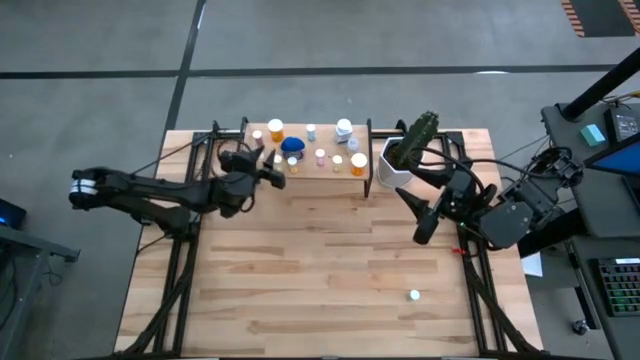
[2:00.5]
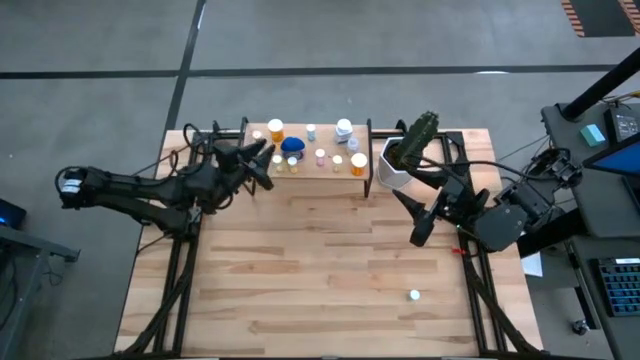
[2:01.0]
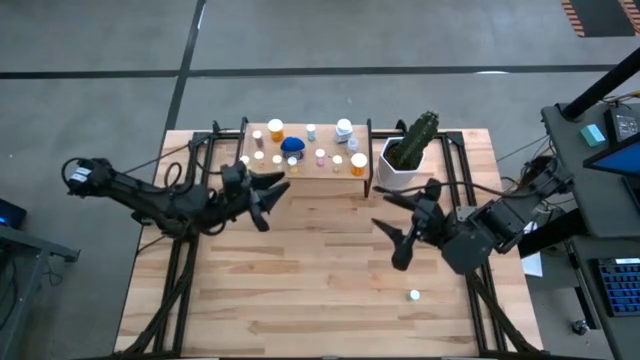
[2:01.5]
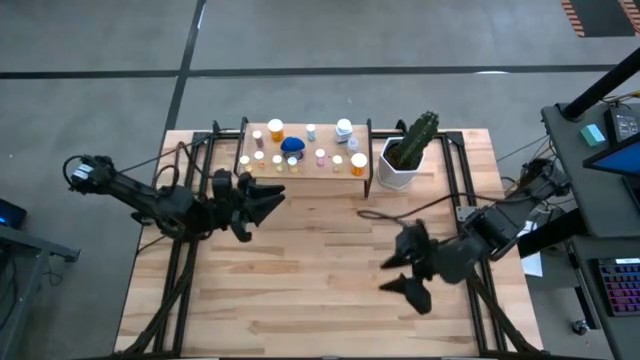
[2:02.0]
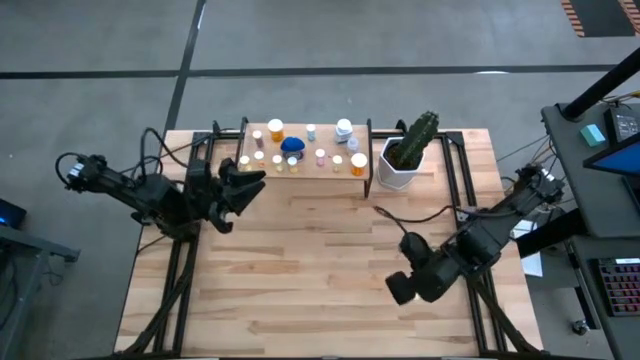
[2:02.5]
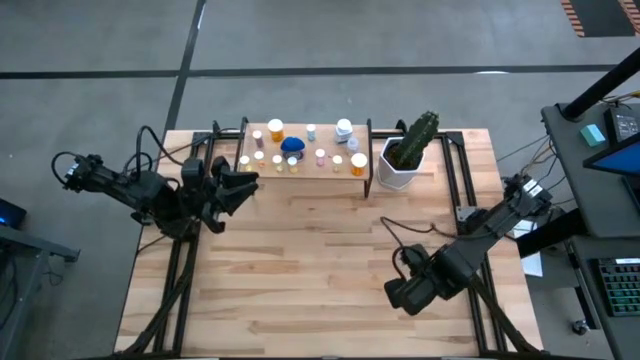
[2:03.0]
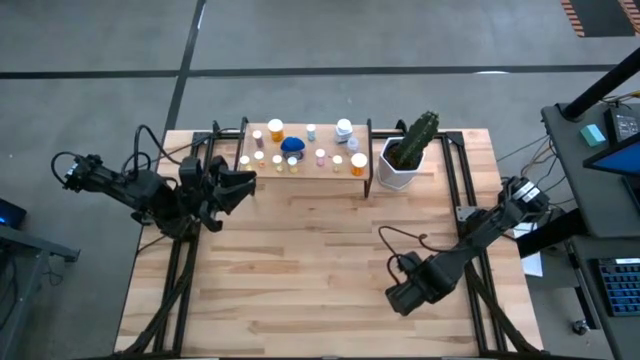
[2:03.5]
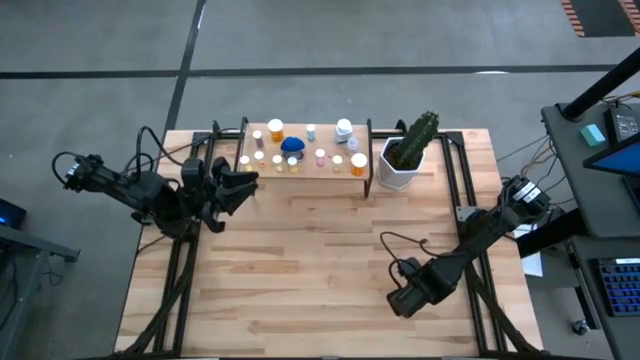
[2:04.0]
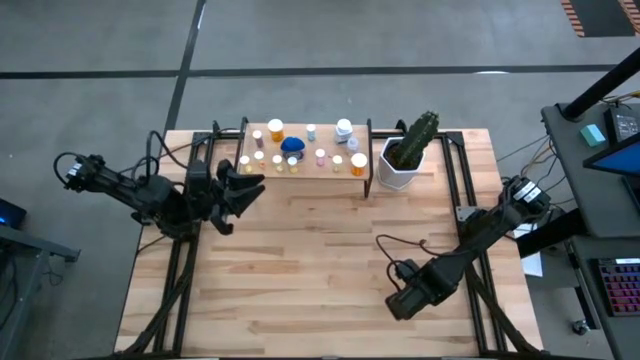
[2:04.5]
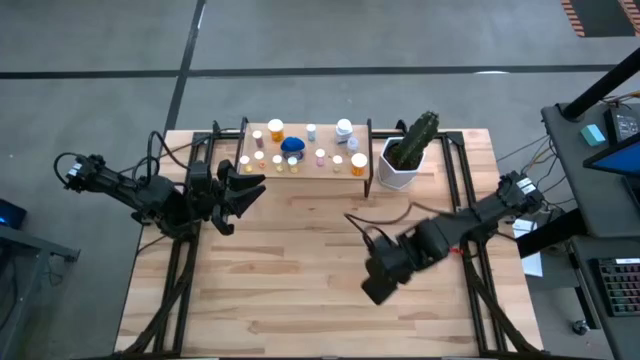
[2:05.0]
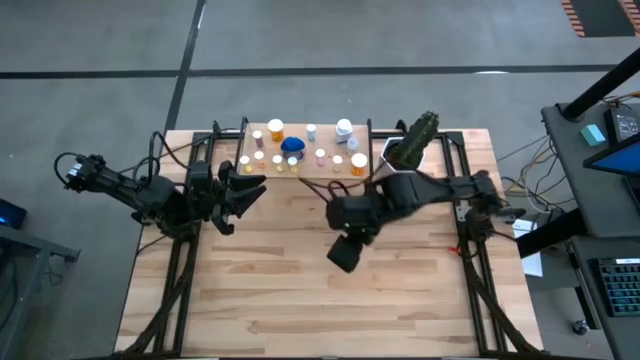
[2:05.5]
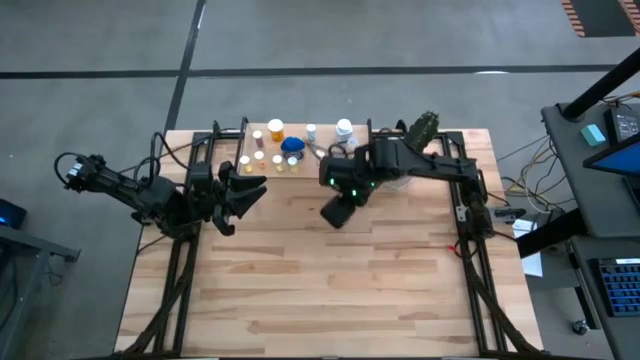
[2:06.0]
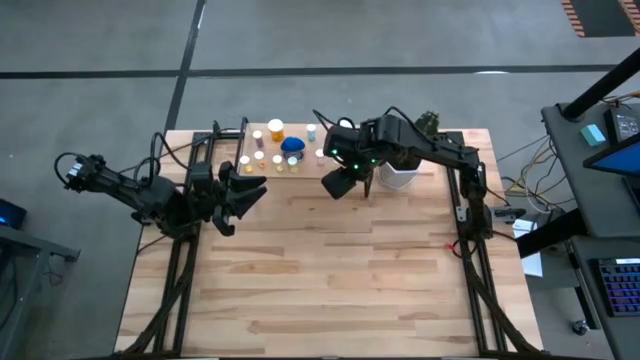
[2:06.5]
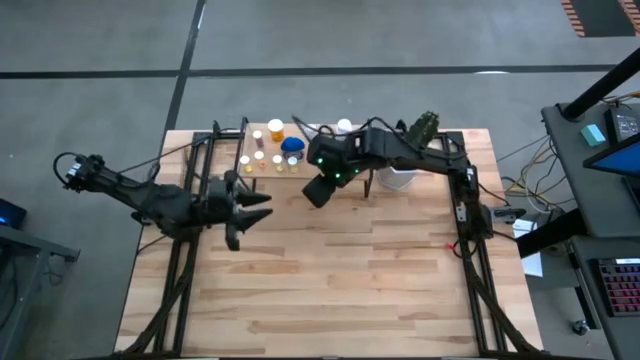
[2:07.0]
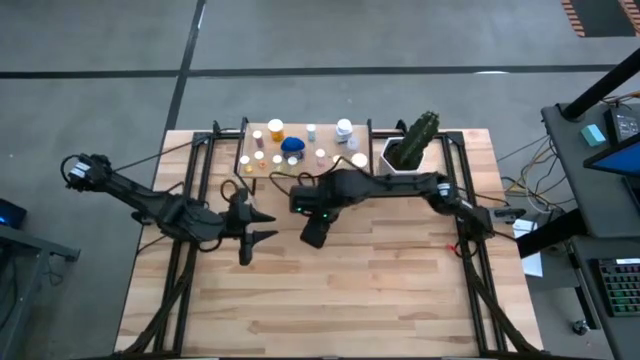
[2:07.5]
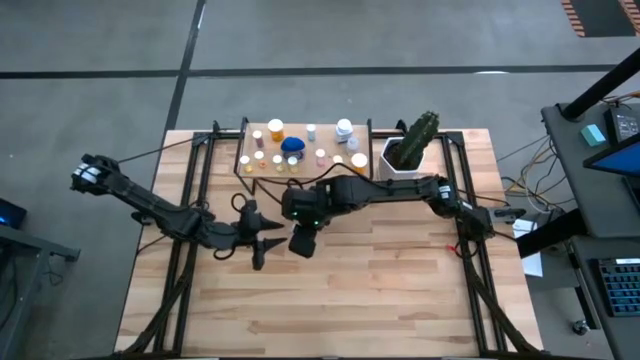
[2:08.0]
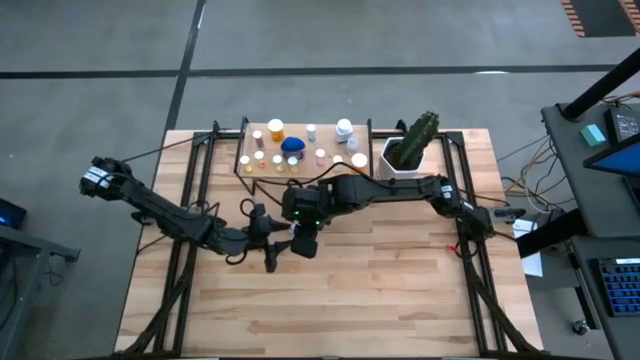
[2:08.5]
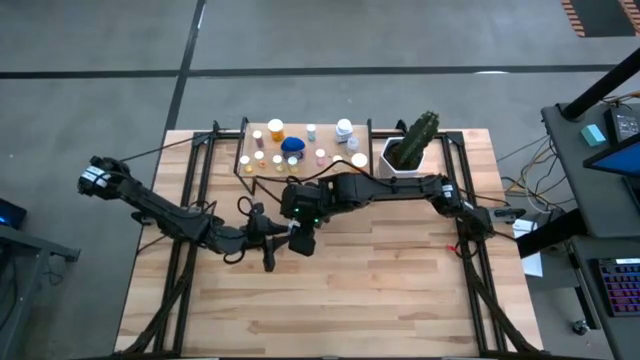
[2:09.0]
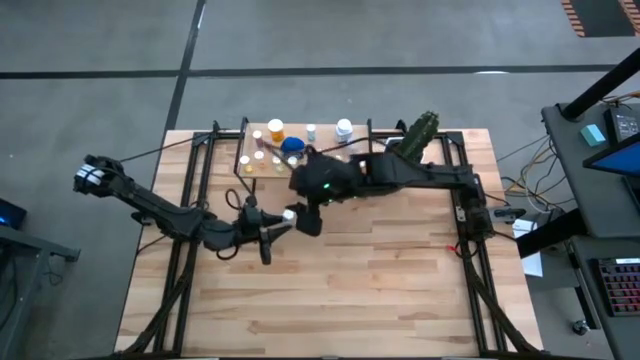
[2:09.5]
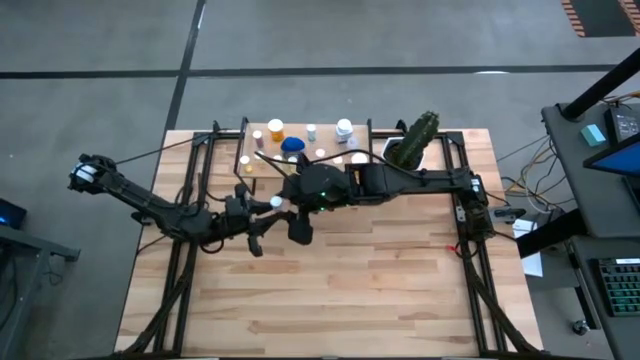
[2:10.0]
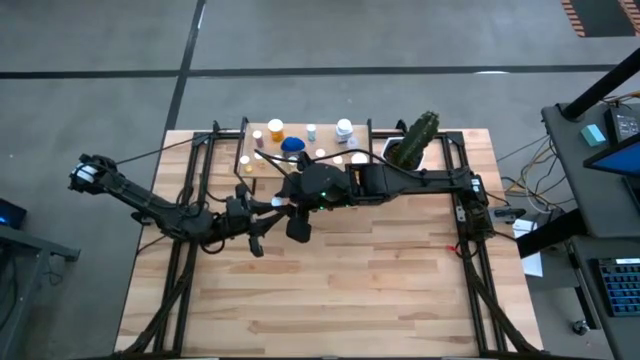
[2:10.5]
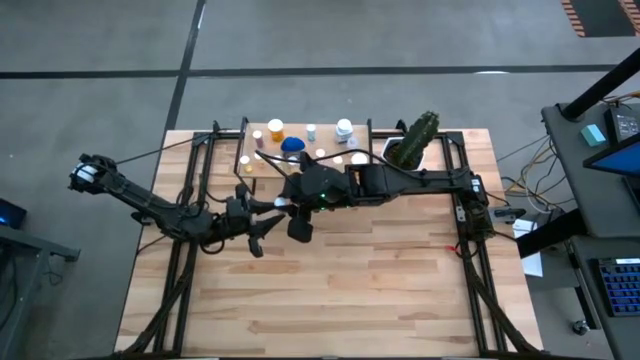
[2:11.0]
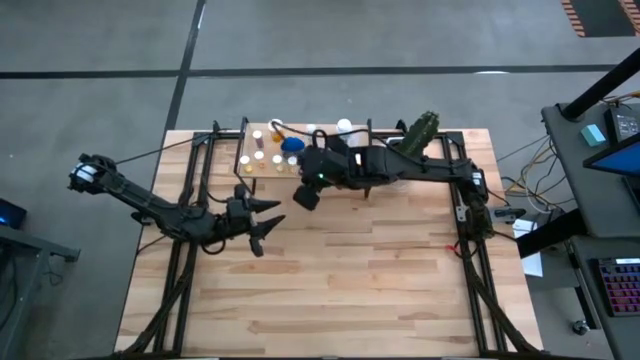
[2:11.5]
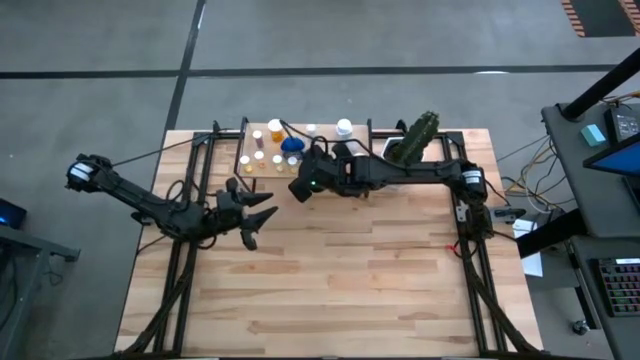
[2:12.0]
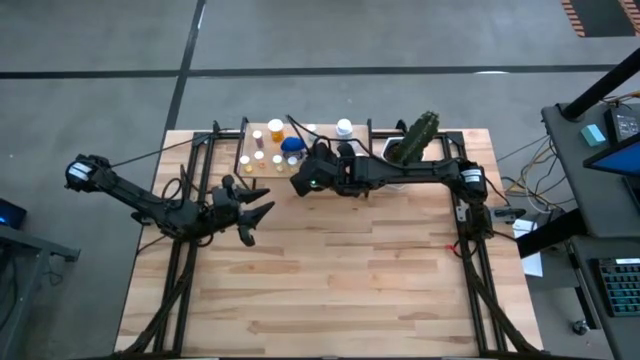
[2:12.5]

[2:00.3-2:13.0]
Task: Pick and place medicine bottles onto shelf by color
Put the light blue pill bottle on the shelf

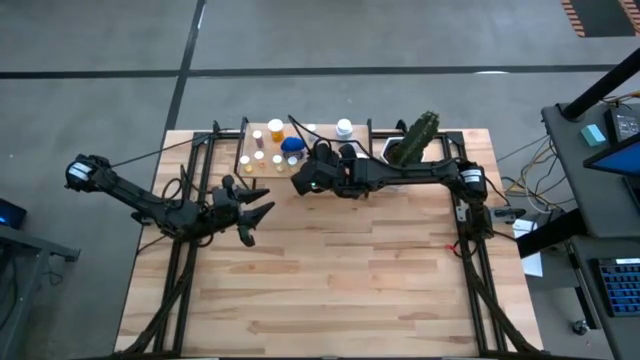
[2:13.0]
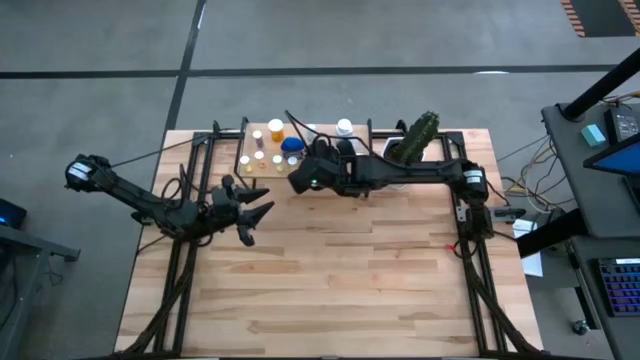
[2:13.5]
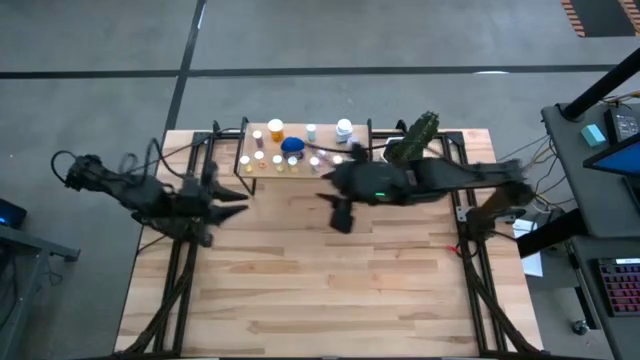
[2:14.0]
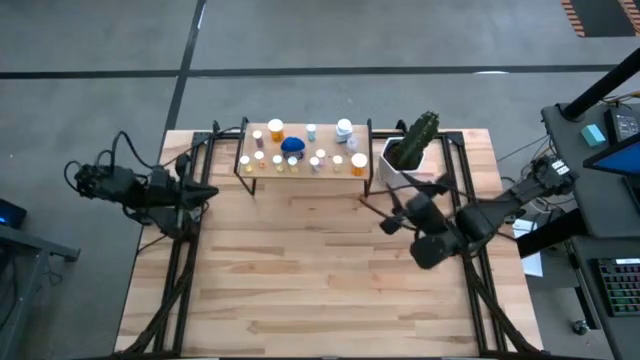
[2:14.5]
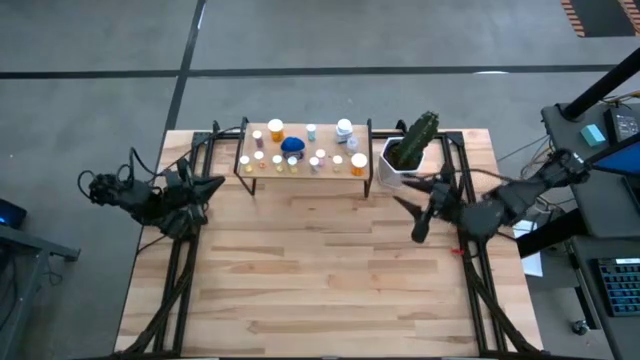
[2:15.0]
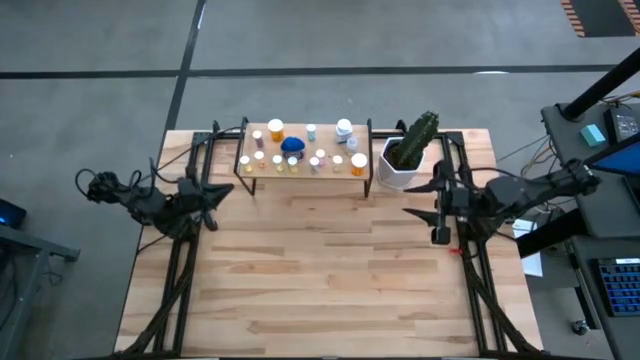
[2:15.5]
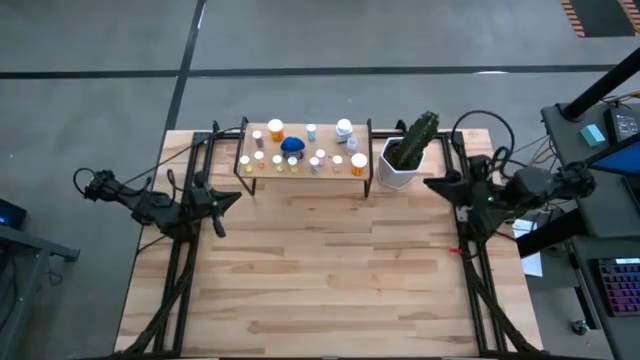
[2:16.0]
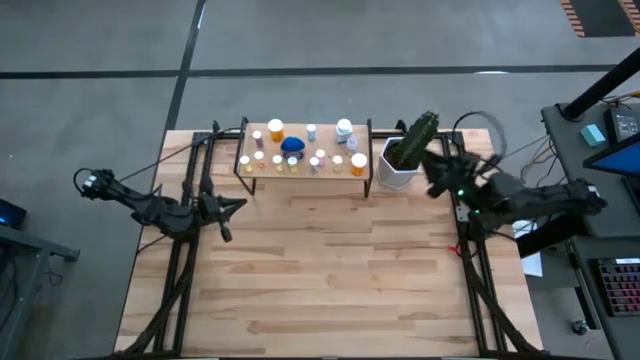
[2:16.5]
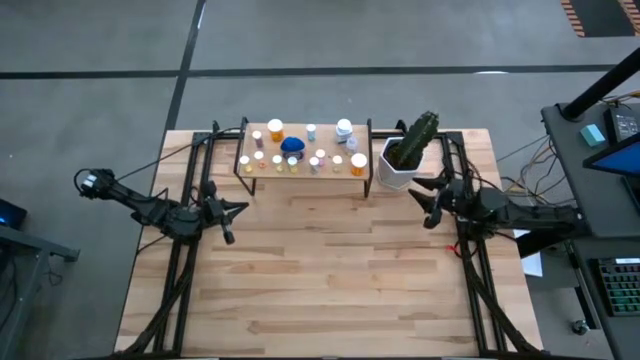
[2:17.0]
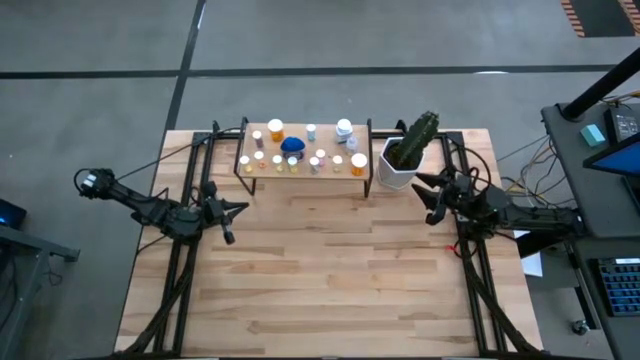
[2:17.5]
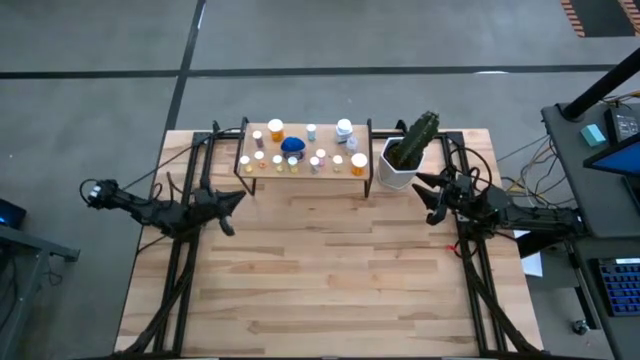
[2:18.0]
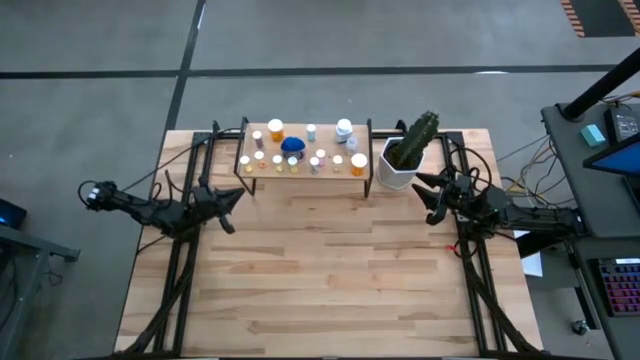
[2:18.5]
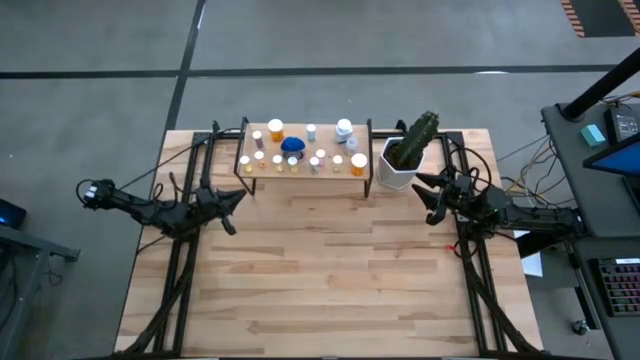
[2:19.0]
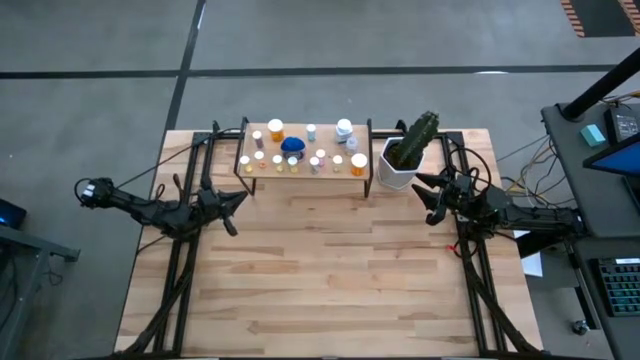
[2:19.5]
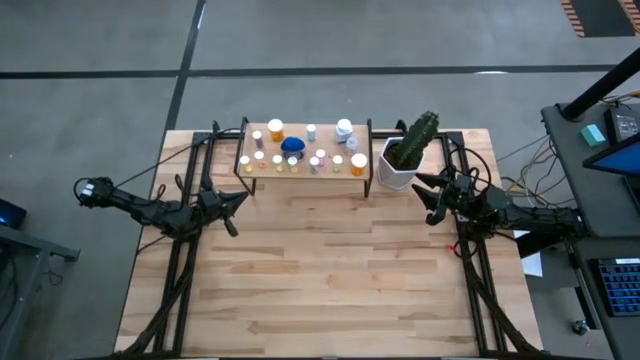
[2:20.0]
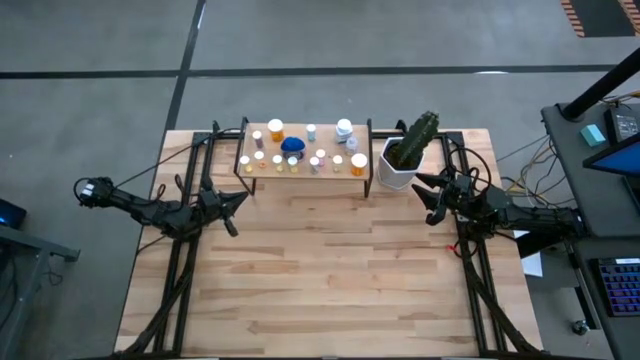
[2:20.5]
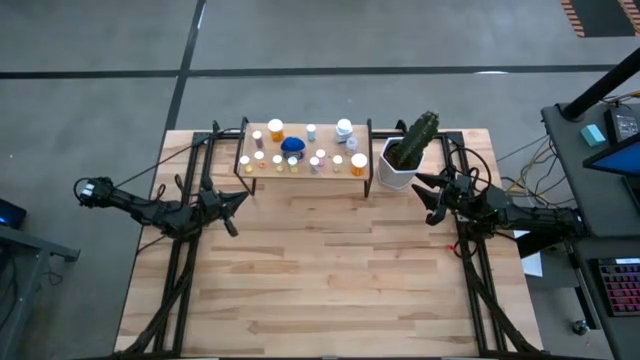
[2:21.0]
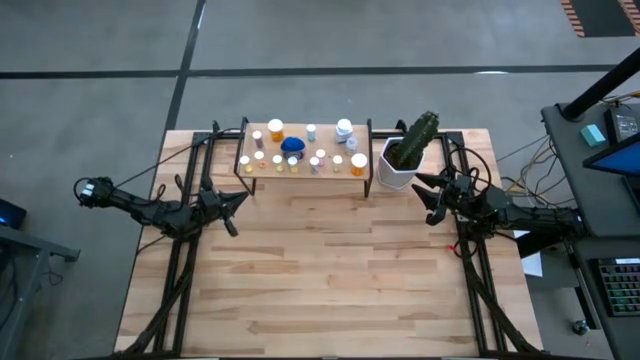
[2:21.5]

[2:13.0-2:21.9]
Return to Home Position
